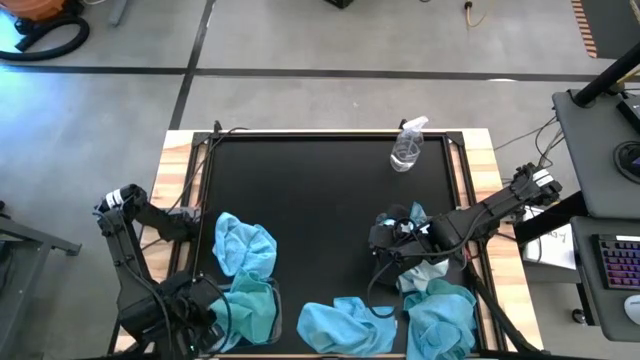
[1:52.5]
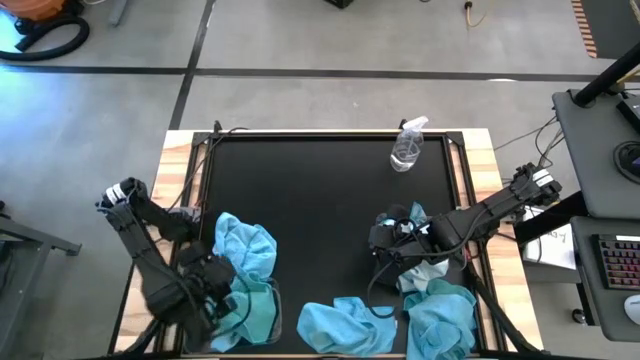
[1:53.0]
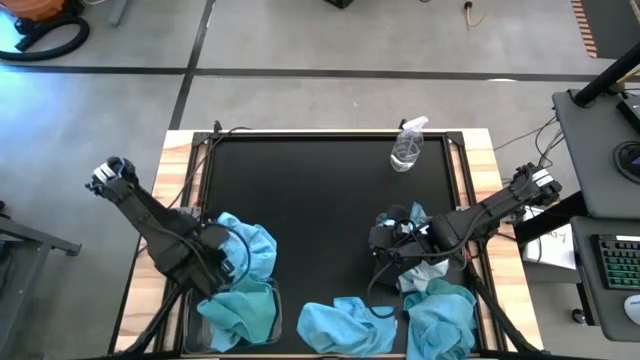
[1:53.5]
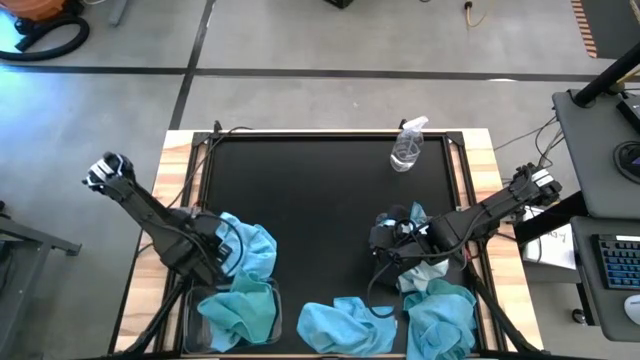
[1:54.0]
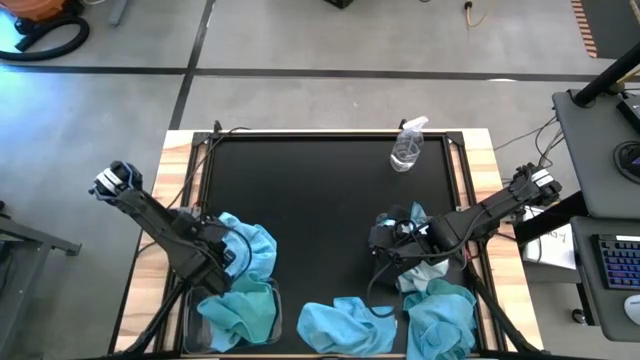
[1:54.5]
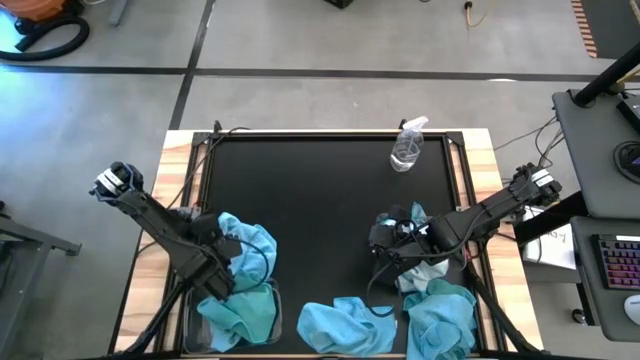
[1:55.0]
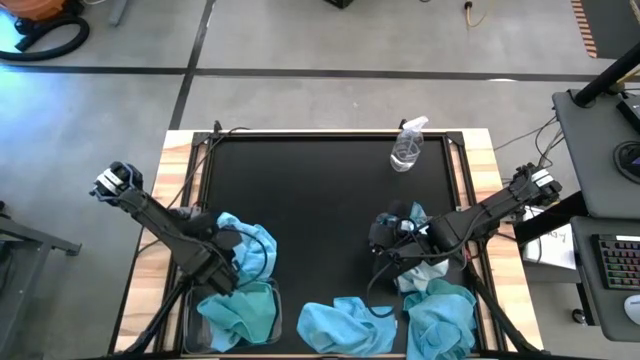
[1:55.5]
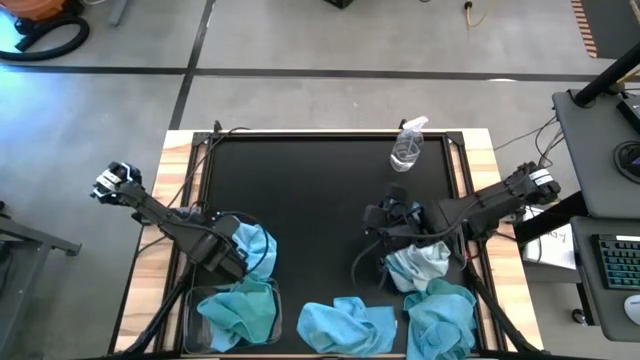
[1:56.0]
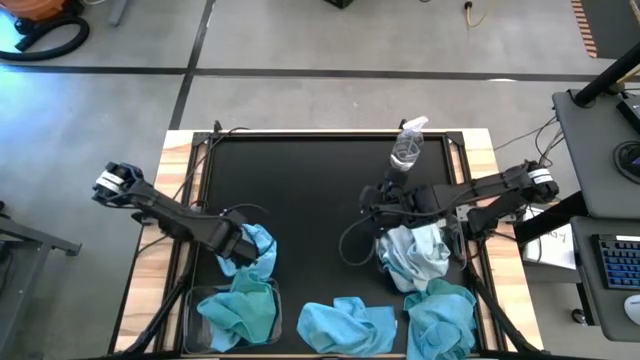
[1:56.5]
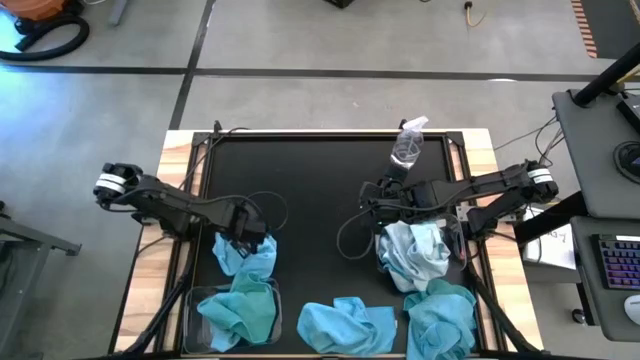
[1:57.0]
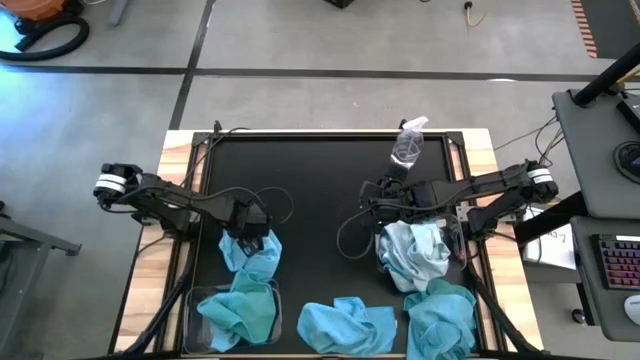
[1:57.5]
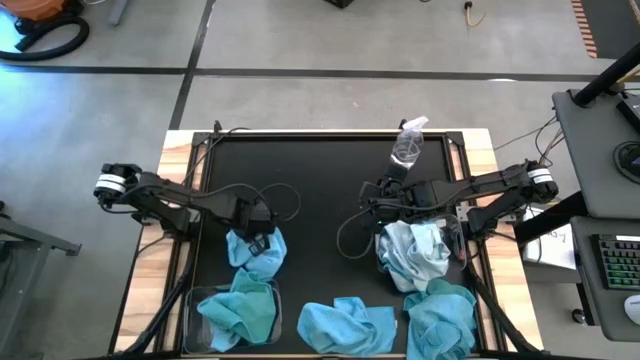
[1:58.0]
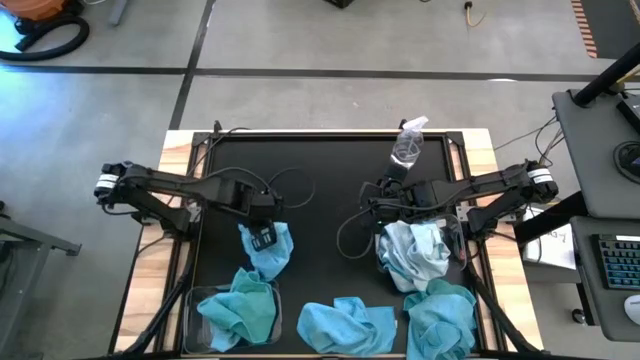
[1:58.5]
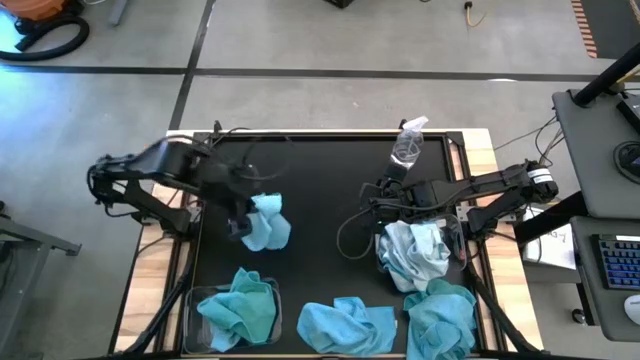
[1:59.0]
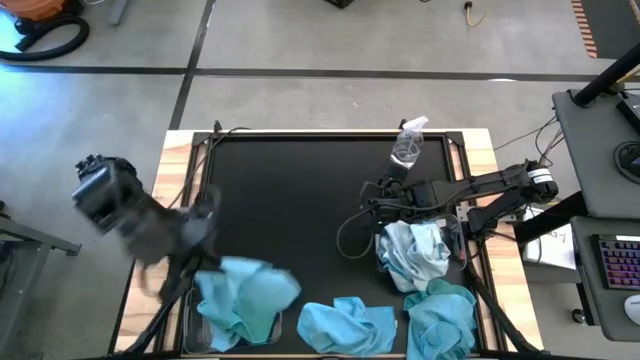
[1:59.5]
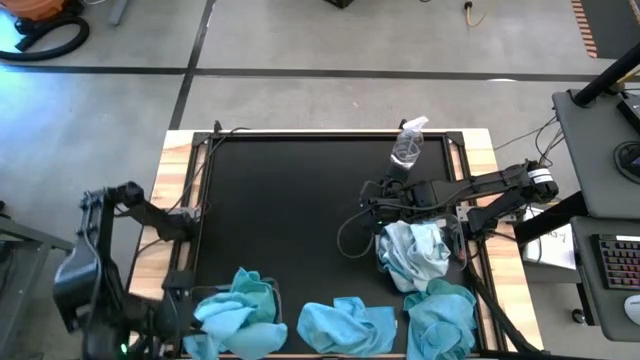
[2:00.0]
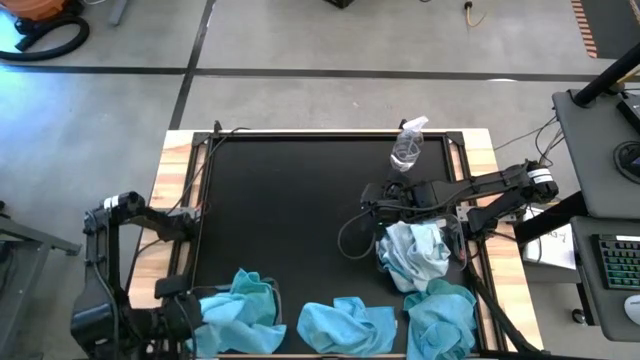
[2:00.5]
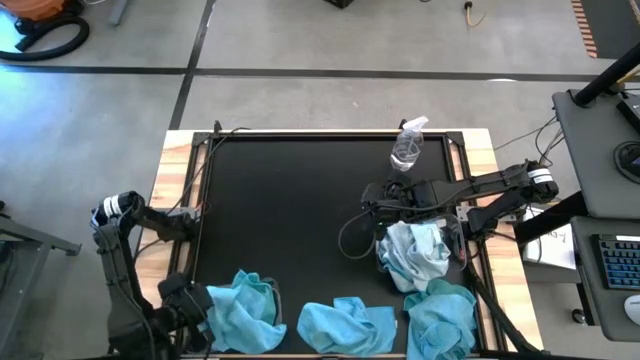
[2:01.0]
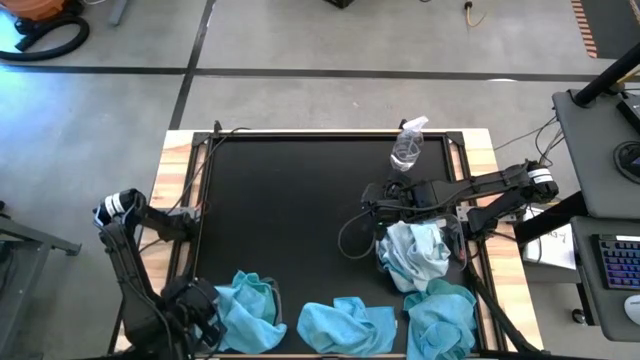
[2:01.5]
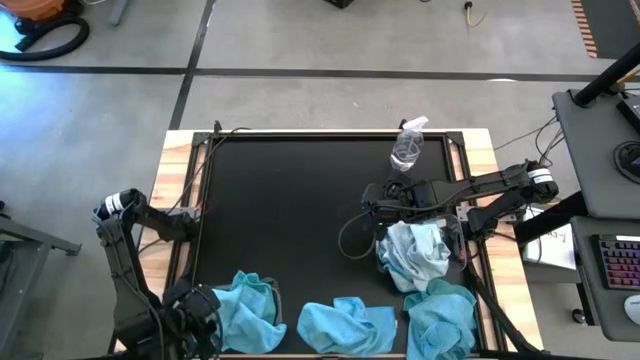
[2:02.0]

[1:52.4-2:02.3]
Task: Sort microfiber towel by color & place in baskets
Put the blue microfiber towel into the left transparent bin

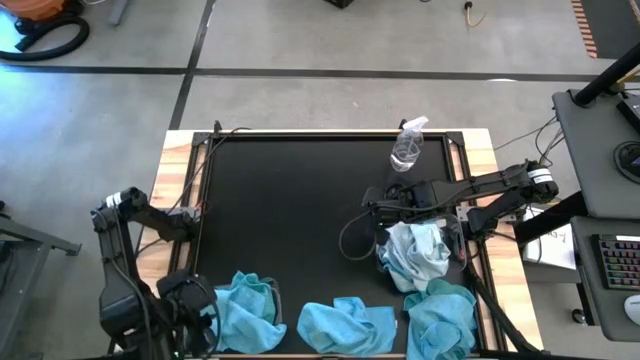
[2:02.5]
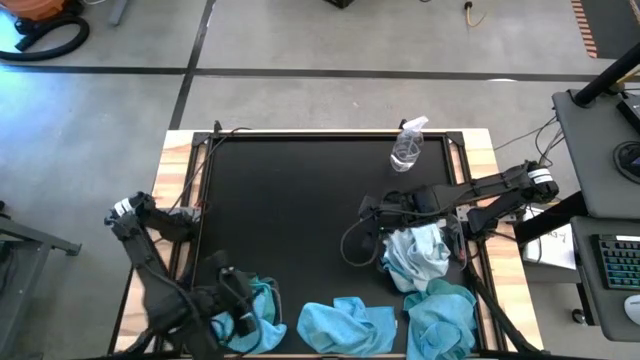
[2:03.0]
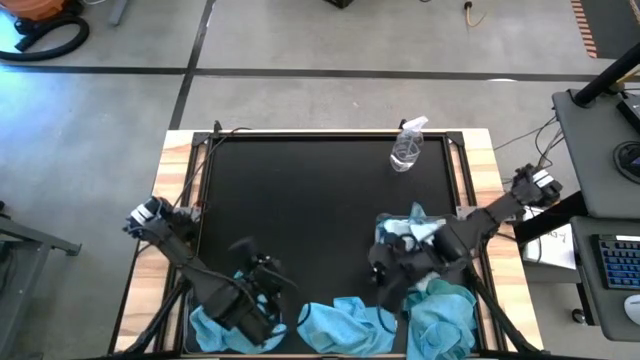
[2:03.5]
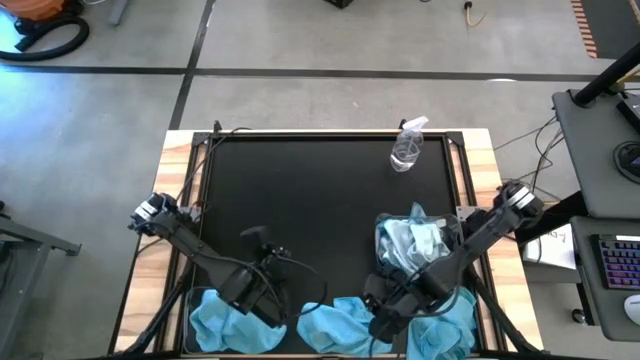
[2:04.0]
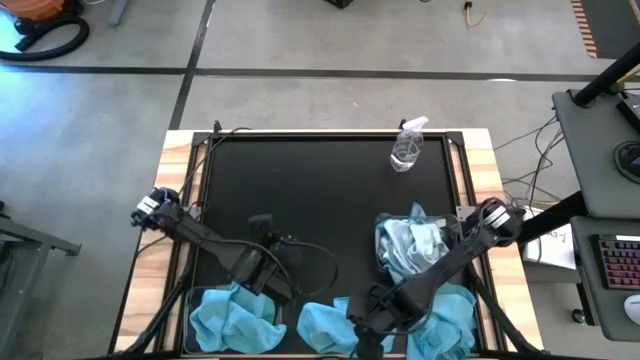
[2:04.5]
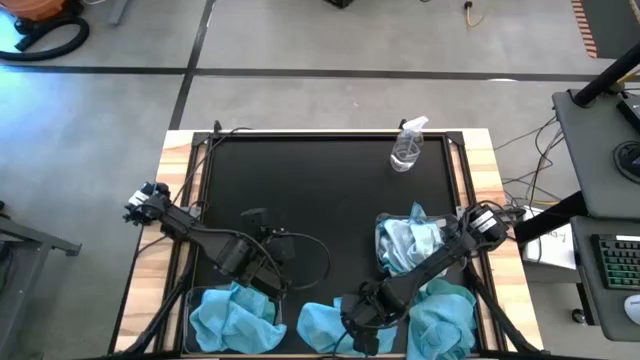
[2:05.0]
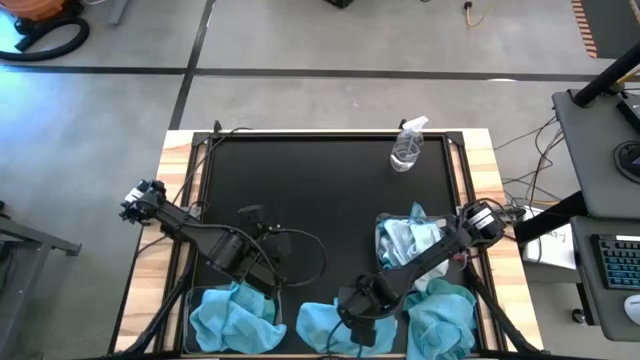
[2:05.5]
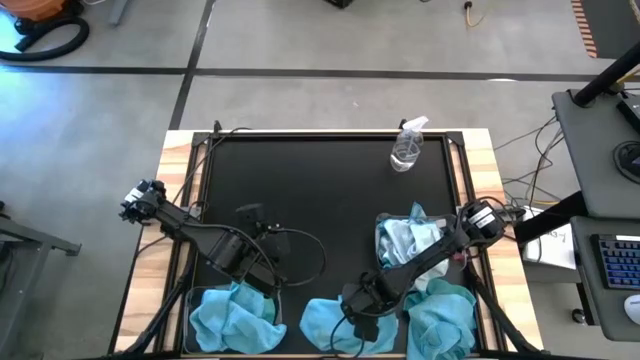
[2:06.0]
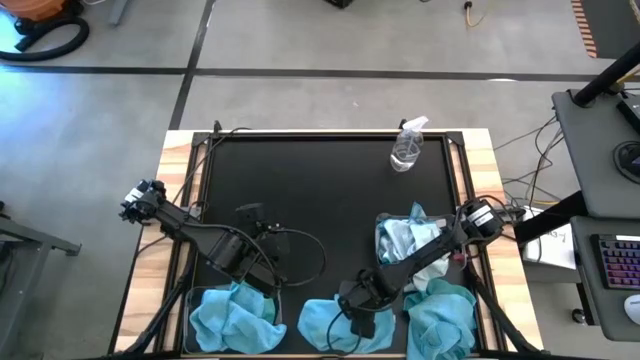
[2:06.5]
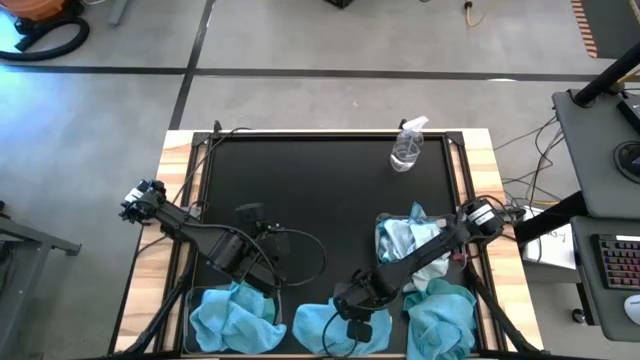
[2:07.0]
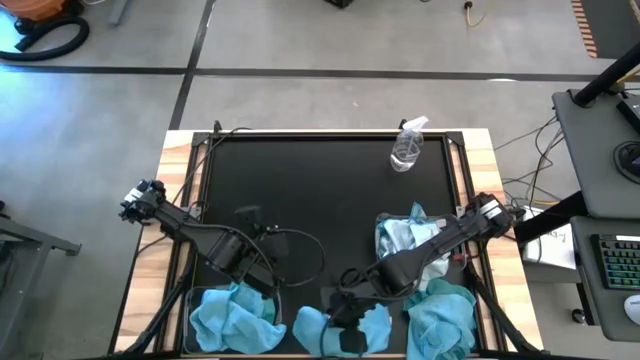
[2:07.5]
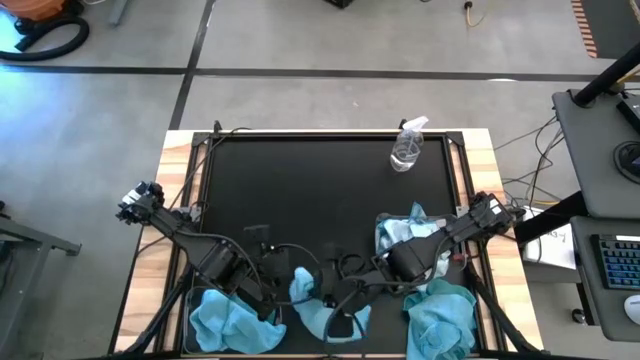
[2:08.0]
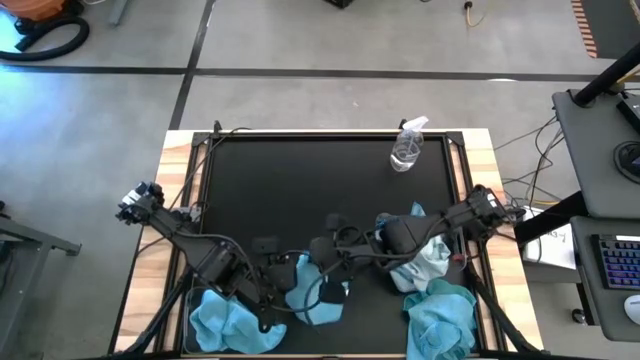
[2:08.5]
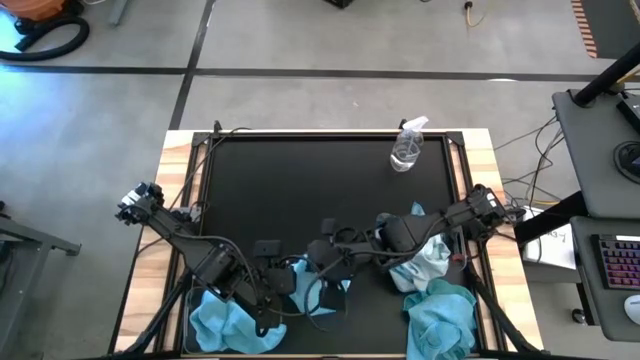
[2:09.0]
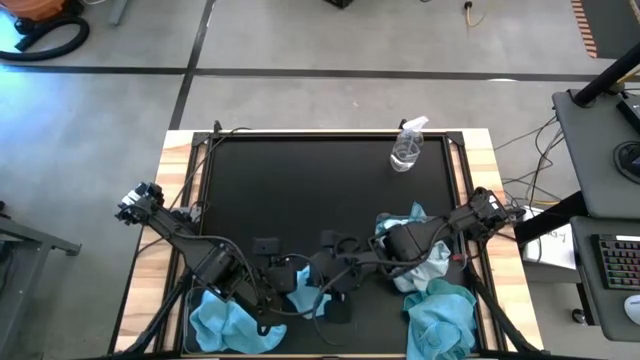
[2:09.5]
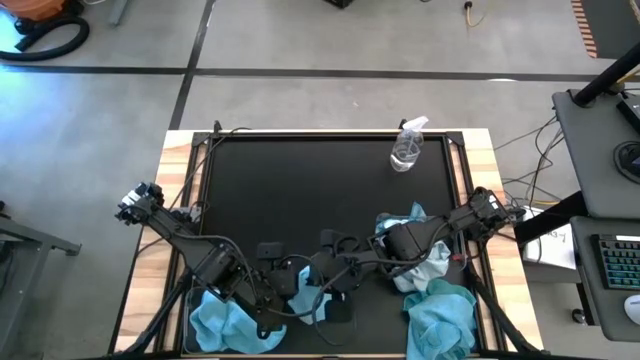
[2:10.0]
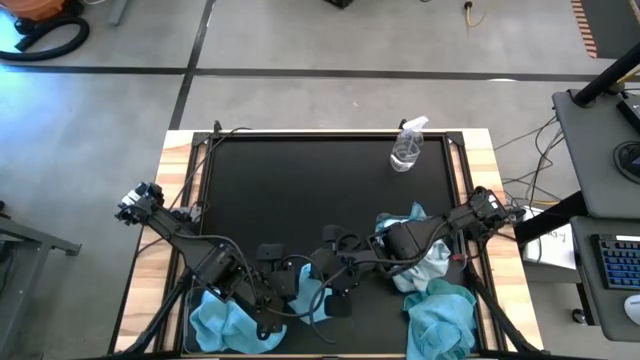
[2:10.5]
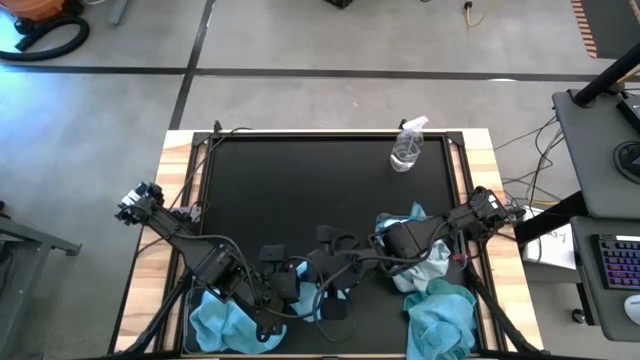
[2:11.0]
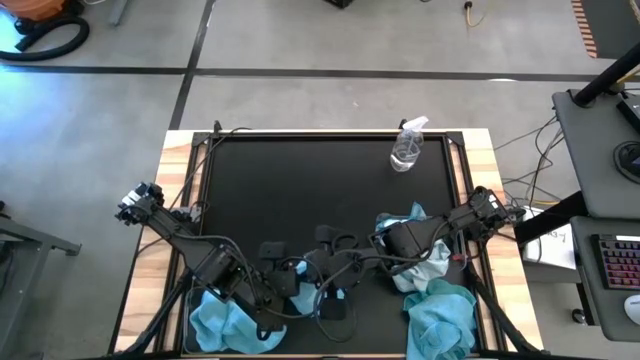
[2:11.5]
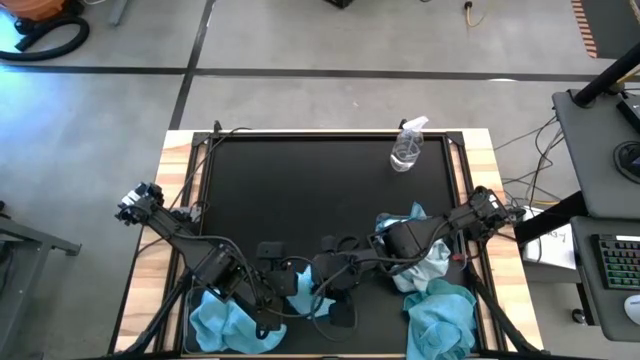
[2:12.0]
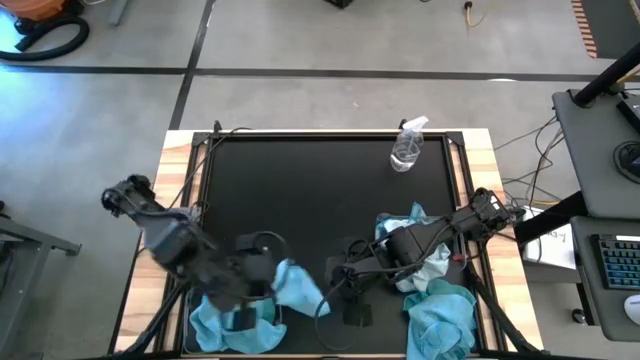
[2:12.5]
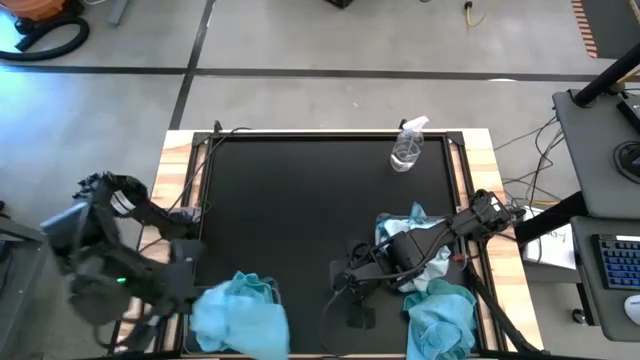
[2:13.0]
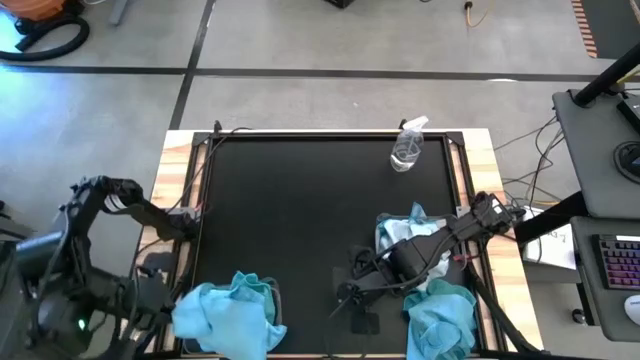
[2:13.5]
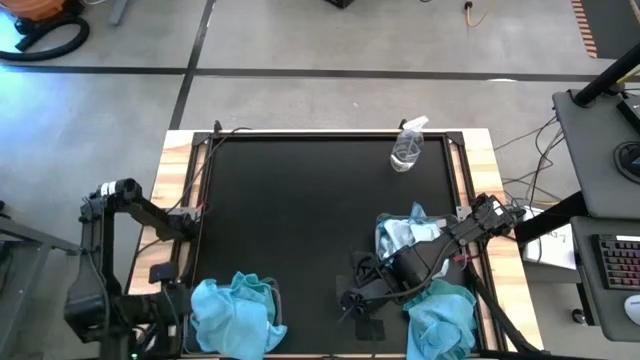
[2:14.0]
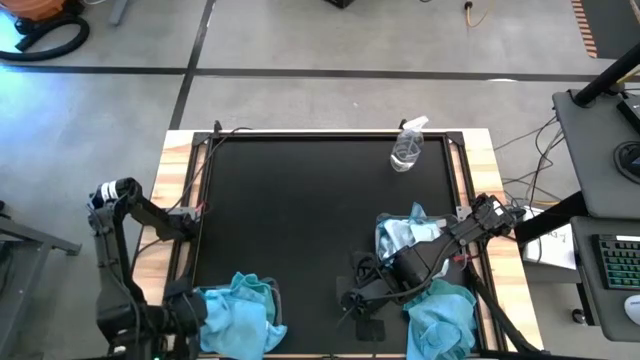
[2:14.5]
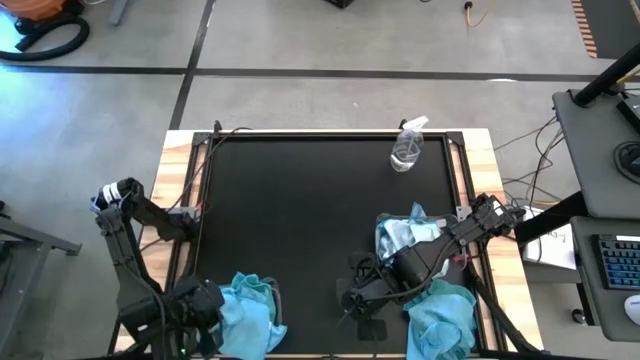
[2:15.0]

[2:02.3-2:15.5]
Put the blue microfiber towel into the left transparent bin
